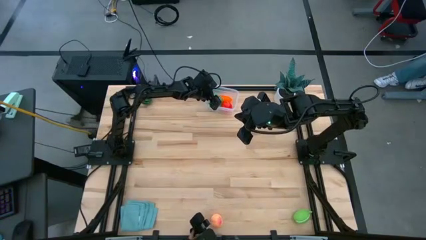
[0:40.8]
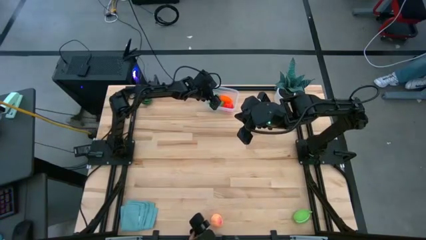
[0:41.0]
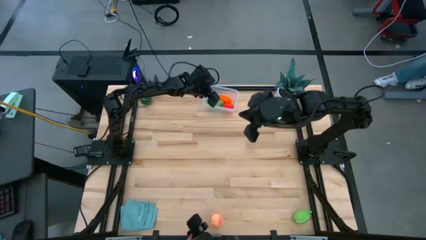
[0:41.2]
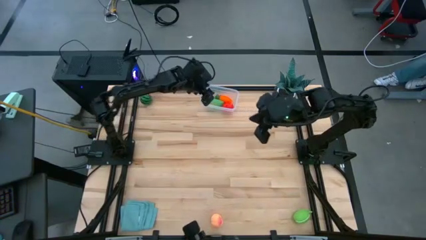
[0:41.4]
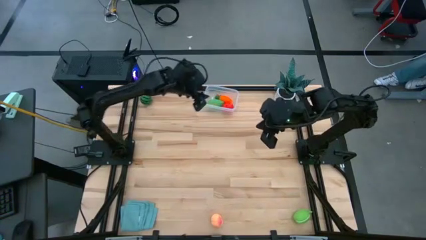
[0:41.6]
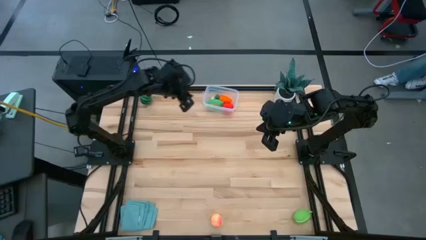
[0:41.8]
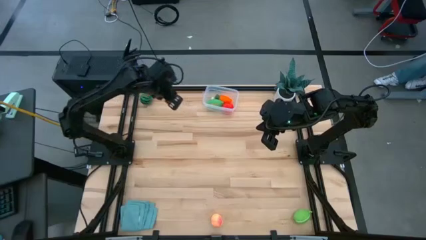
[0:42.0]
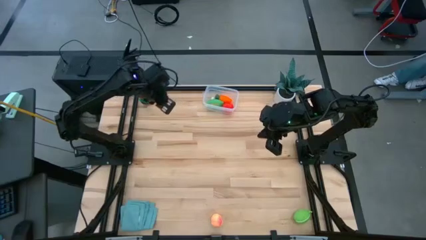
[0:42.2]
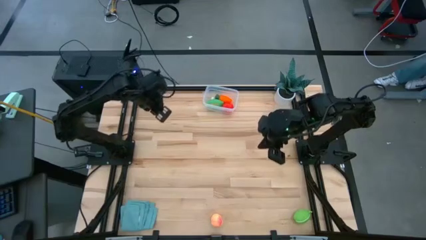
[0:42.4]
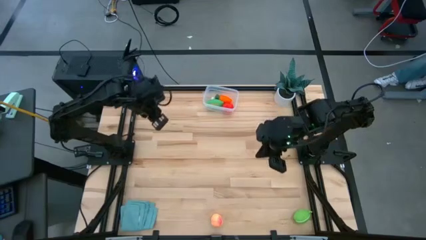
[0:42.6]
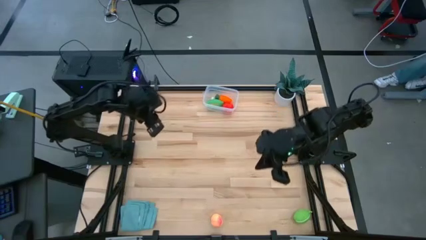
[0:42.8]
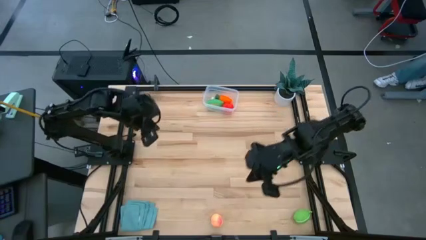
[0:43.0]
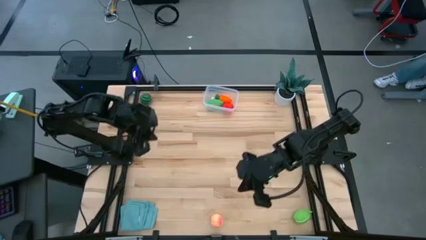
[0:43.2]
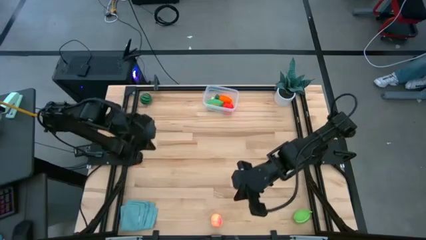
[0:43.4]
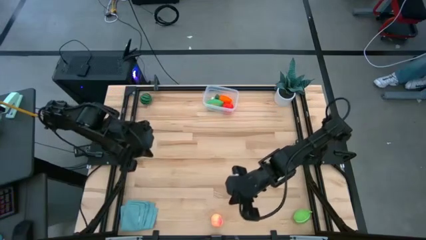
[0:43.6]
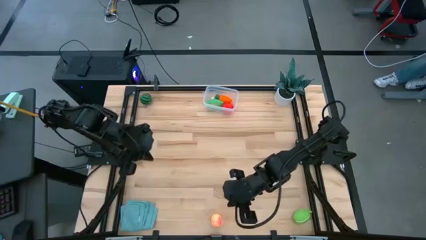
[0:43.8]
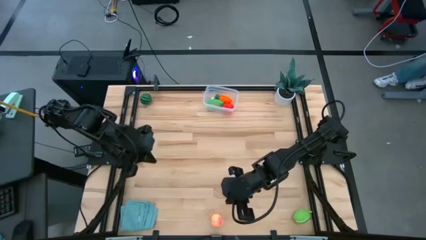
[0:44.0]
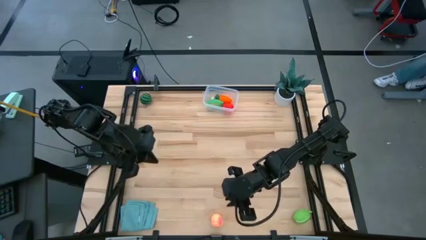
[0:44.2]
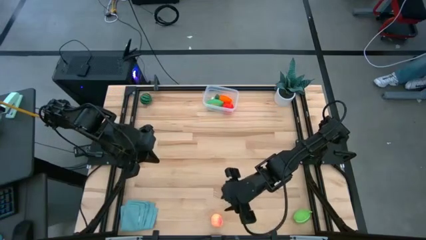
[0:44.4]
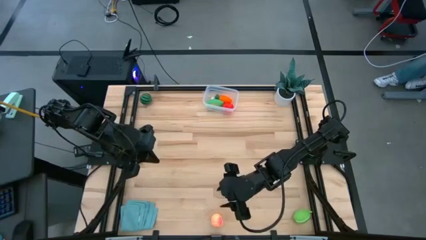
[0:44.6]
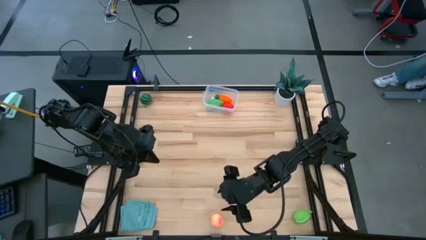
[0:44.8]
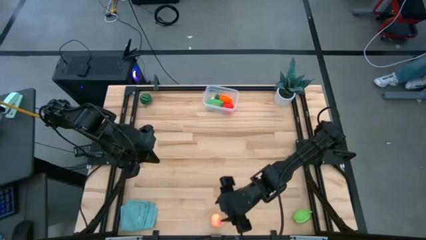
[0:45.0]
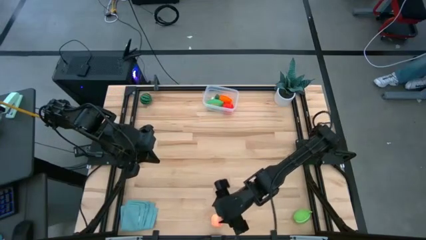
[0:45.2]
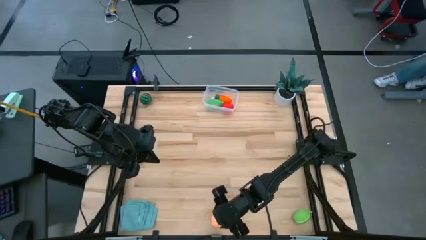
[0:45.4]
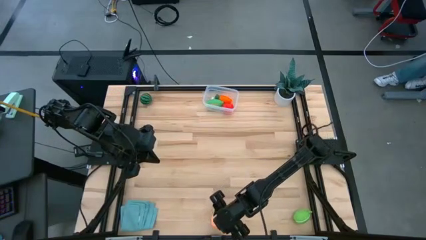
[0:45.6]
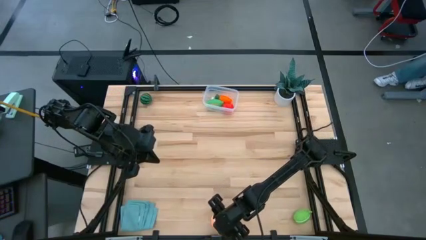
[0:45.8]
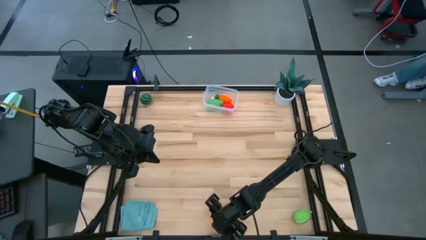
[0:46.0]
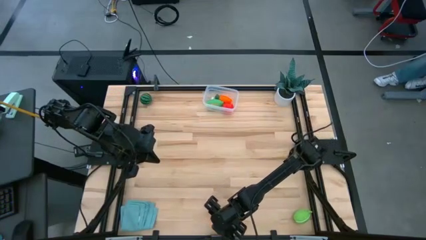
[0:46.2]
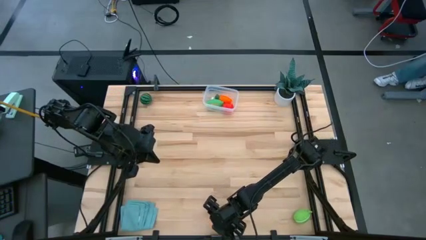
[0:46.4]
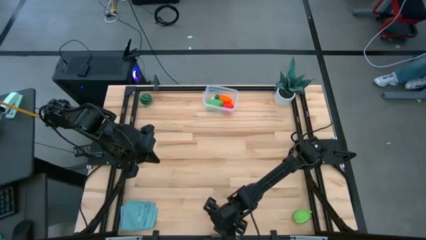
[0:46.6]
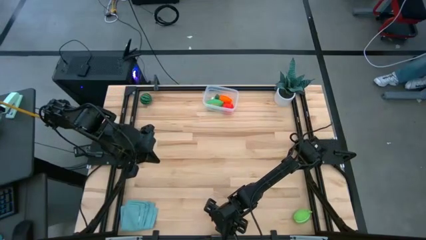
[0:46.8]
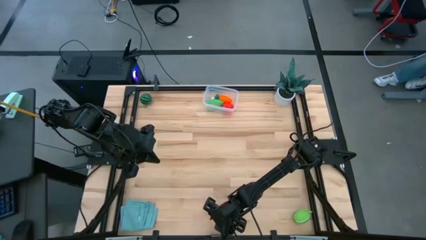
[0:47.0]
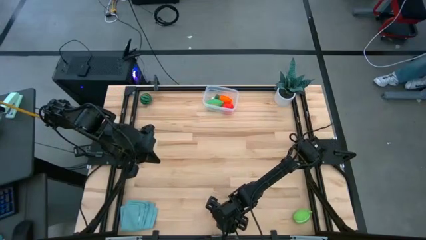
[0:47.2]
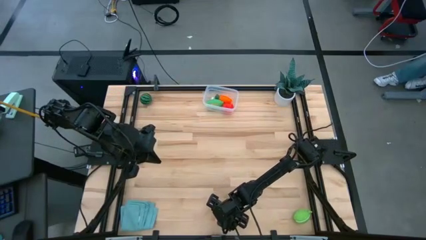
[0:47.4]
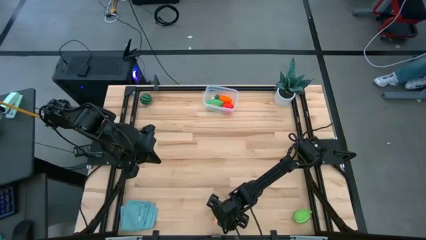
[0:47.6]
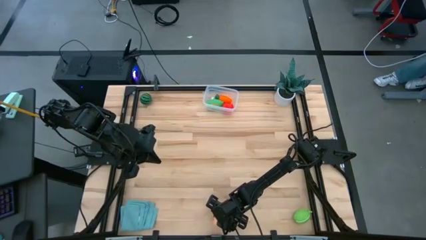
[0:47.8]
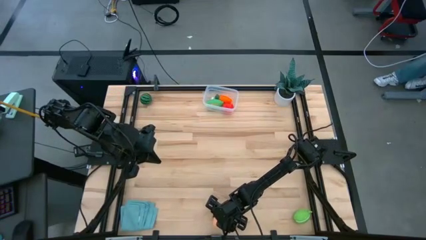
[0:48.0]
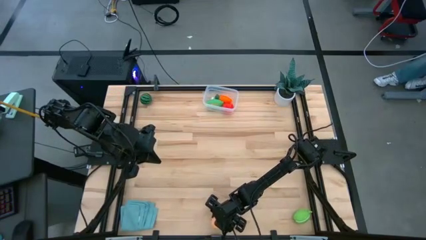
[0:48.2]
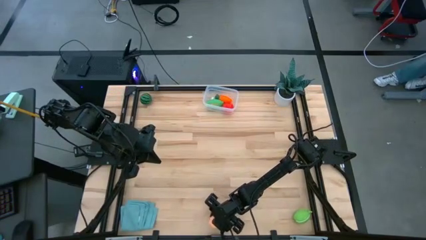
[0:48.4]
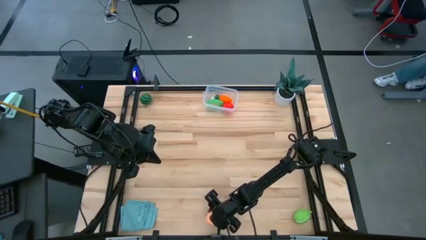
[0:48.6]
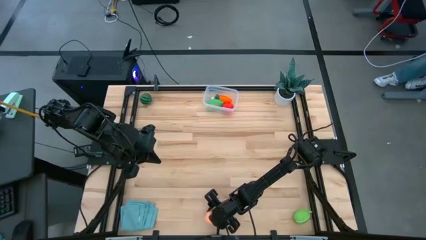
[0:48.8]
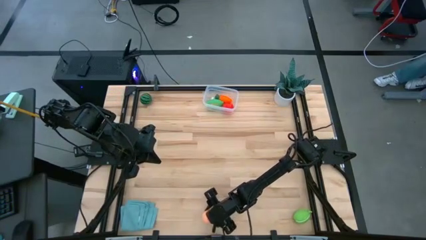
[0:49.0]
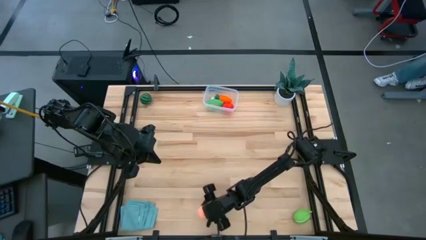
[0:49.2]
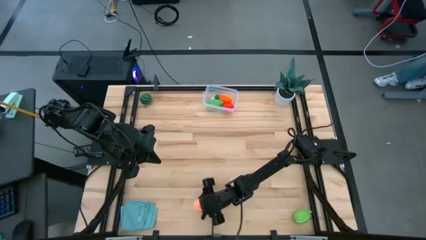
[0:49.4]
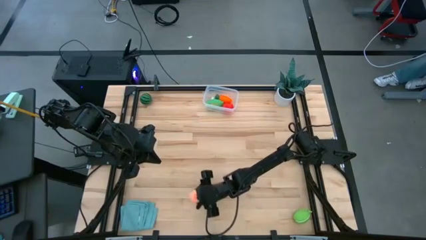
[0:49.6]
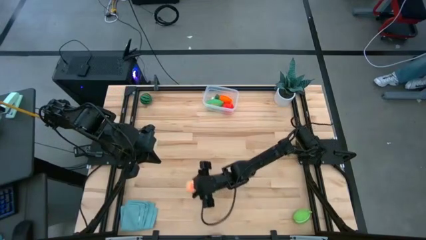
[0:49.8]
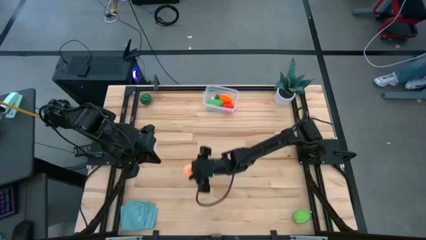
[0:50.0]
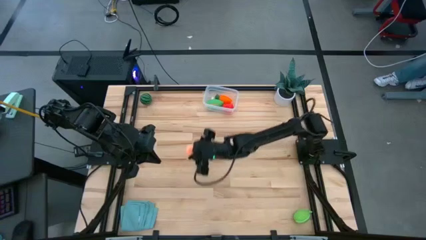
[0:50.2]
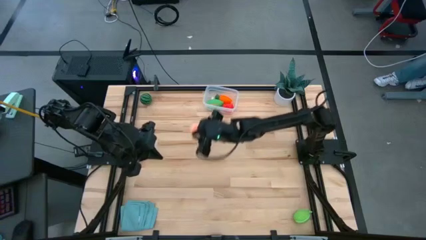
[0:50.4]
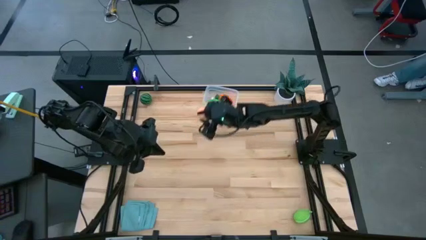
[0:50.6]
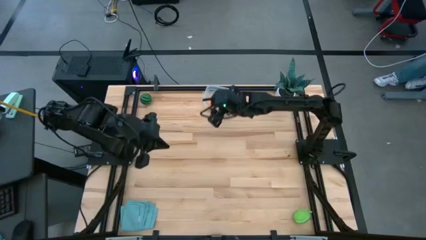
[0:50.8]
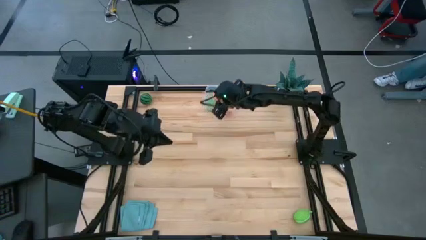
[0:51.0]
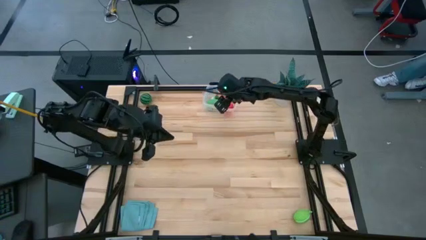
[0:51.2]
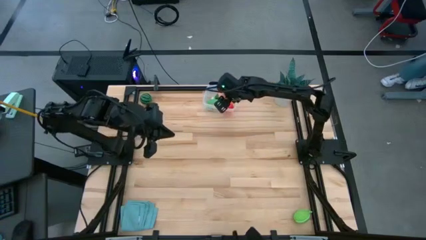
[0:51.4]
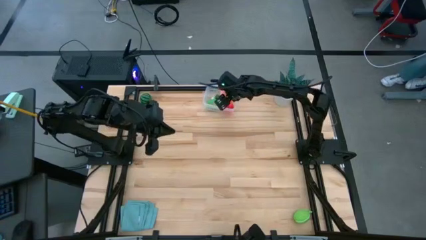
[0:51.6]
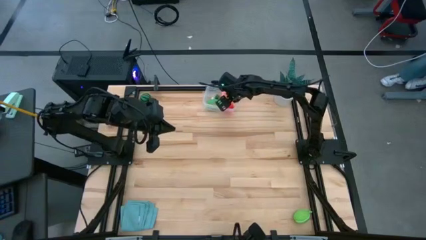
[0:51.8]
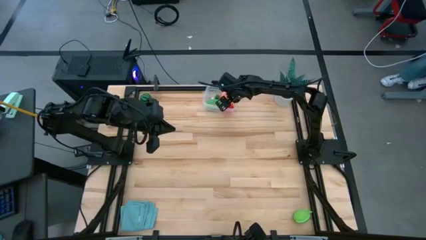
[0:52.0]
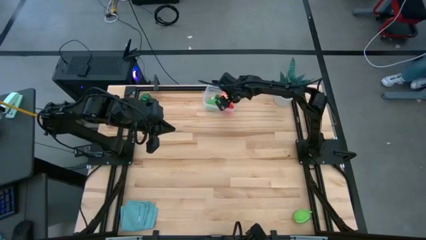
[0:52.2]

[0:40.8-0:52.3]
Task: Pick and placing Produce into tupperware
Put the light pink peach into the transparent container
